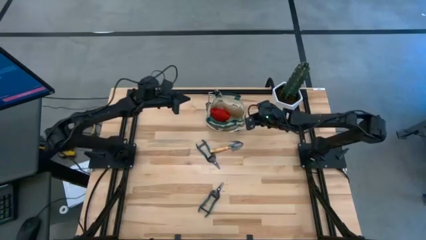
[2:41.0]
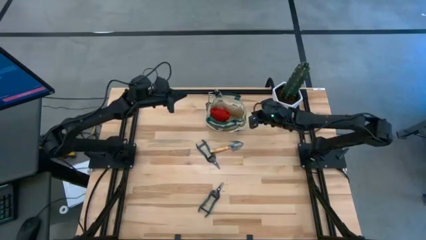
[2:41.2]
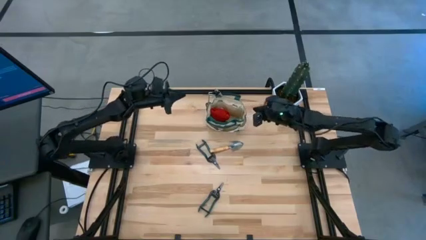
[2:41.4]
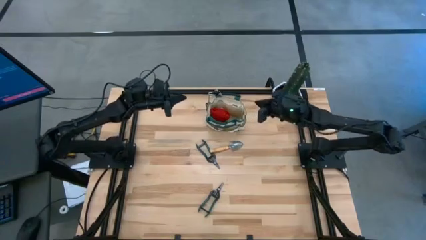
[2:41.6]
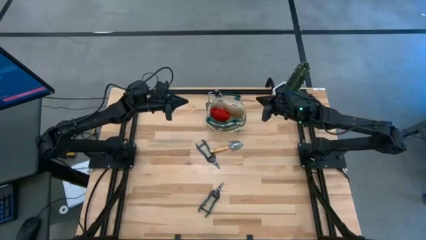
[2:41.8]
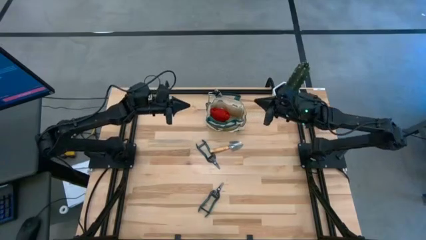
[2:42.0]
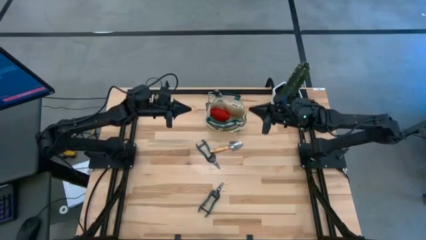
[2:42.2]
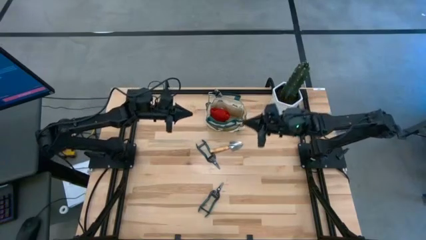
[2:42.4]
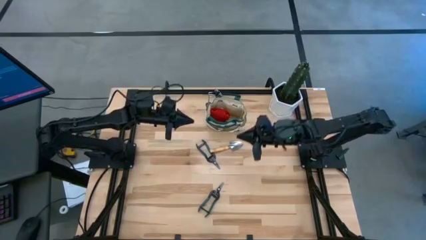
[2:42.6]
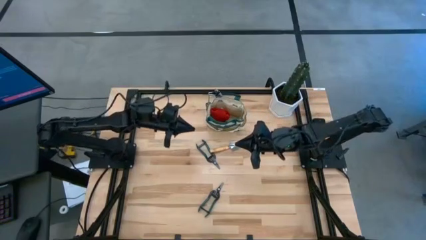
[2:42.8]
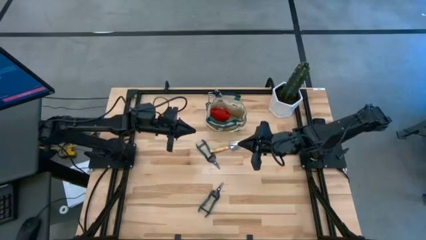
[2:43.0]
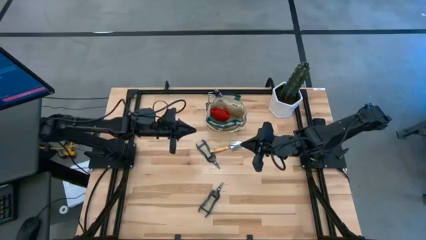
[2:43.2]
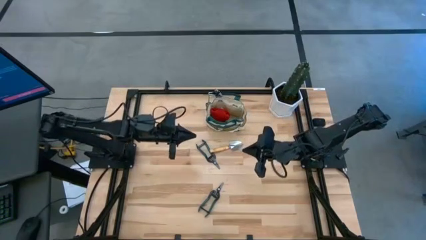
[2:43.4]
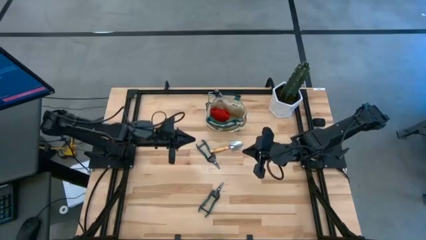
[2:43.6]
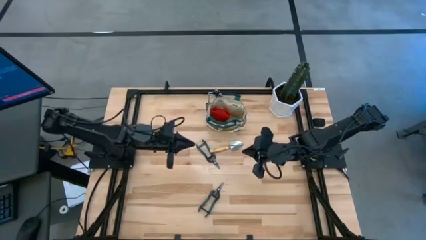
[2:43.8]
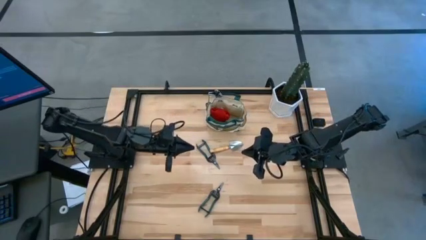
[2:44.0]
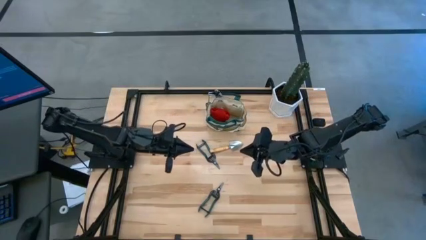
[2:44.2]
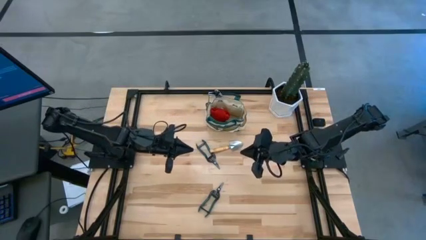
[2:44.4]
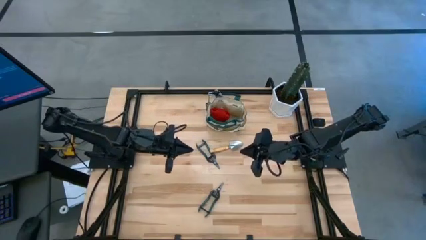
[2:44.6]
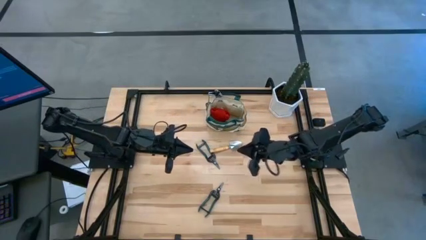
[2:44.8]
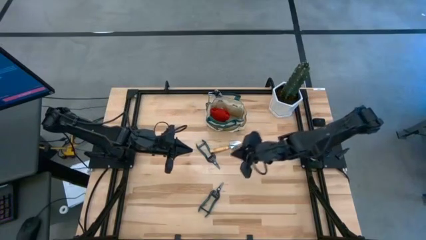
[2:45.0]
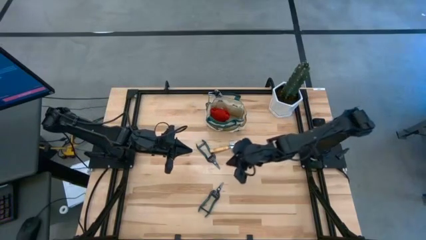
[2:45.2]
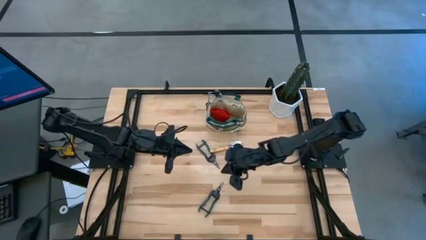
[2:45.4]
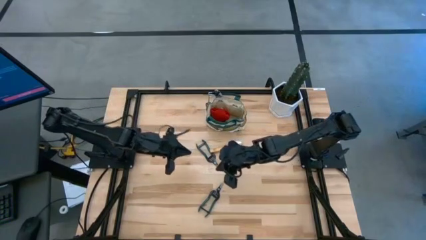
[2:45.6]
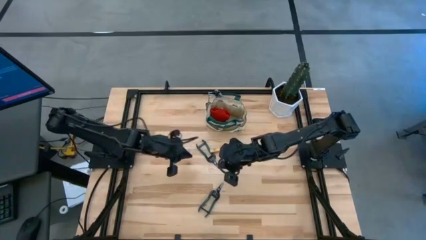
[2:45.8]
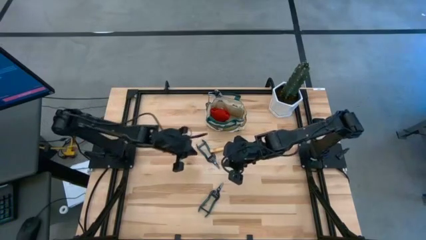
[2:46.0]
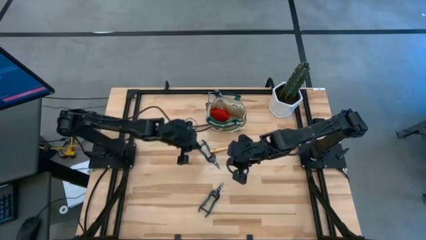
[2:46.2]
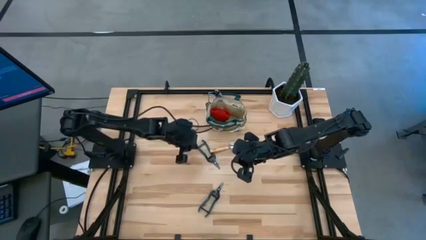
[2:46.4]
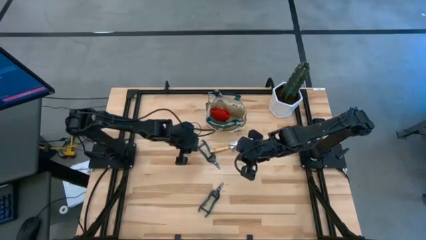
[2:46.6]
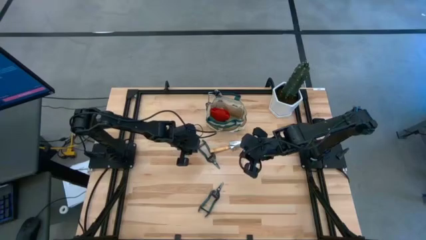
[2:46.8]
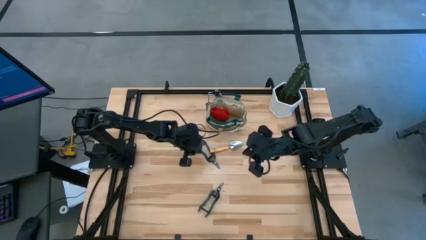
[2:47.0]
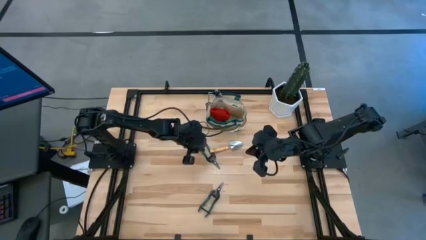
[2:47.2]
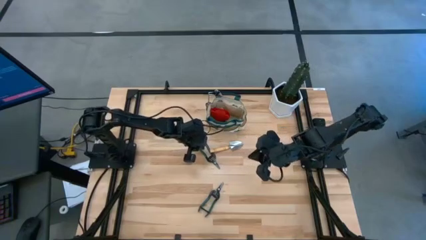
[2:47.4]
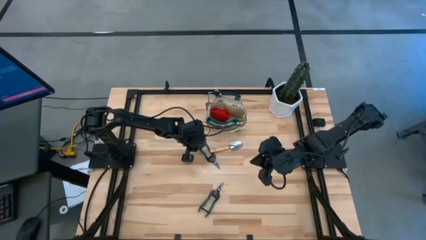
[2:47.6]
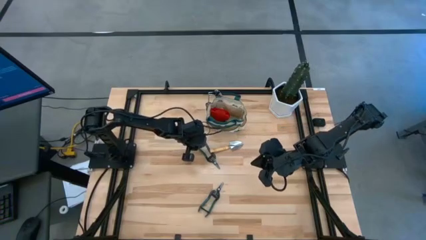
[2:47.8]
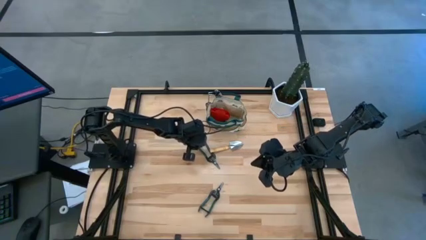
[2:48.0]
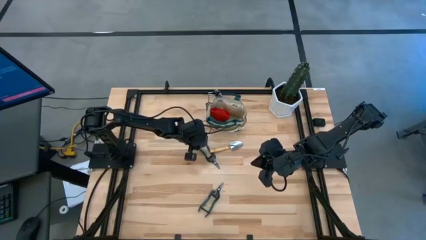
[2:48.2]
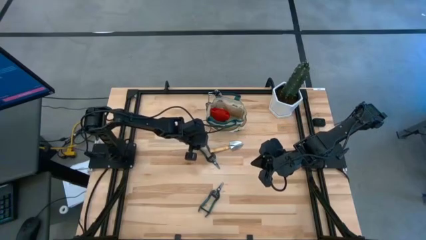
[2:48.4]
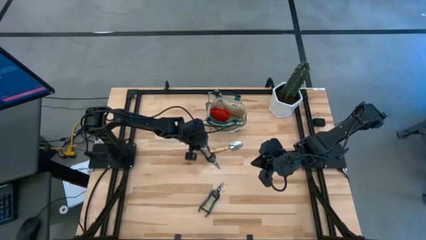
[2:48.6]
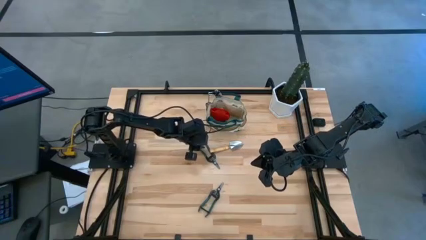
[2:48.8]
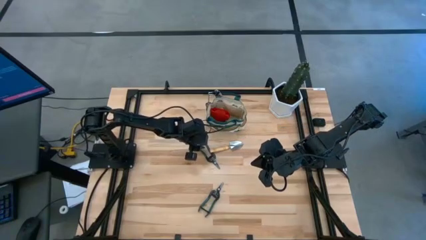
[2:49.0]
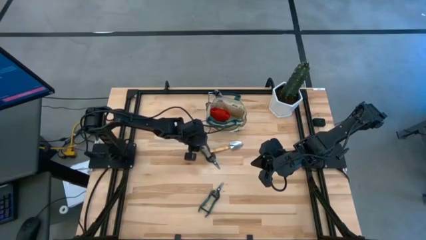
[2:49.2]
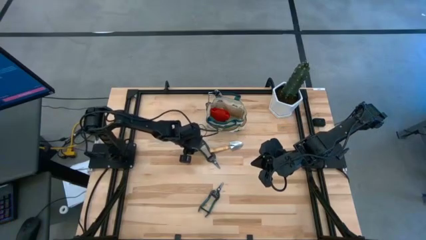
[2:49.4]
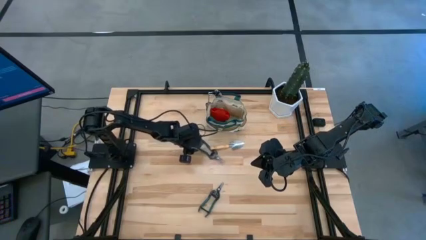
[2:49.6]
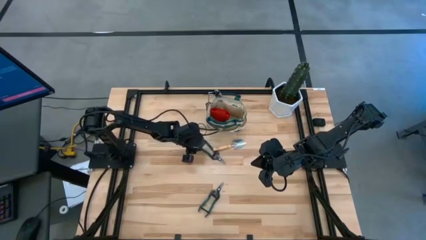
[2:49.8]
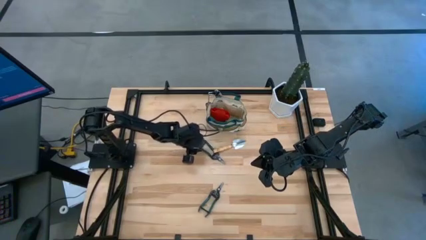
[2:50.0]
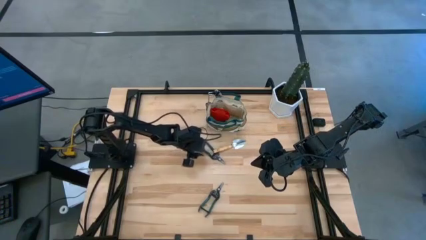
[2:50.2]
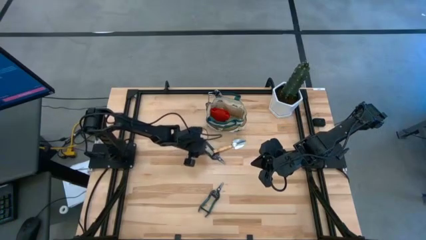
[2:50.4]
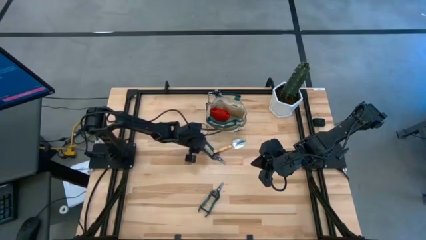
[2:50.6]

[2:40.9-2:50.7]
Task: Pick & Place Garden tools in Gardening bag
Put the top green shears into the brown gardening bag

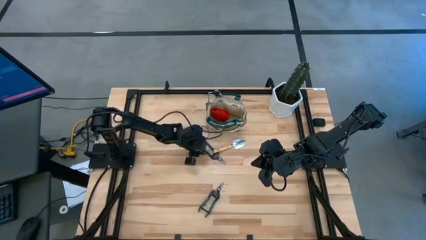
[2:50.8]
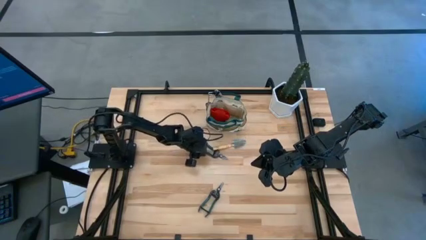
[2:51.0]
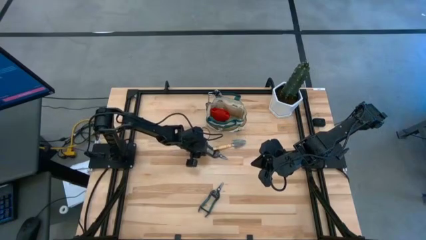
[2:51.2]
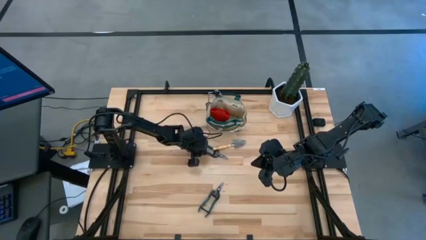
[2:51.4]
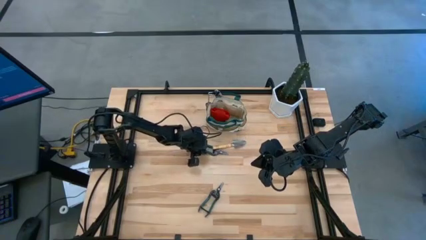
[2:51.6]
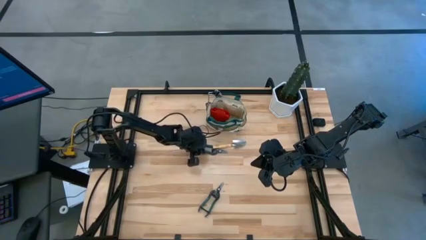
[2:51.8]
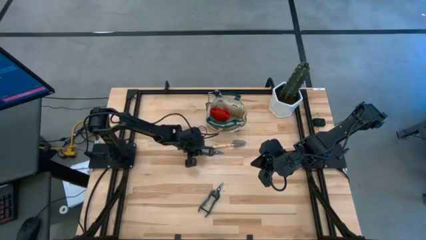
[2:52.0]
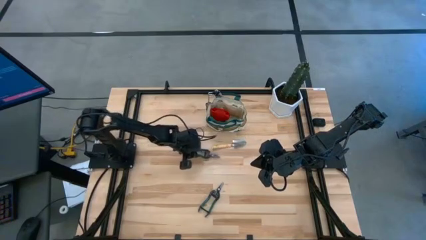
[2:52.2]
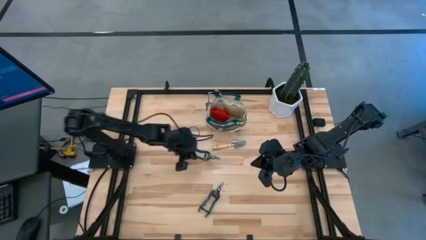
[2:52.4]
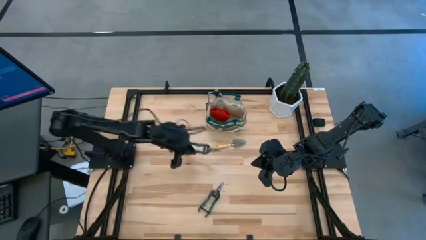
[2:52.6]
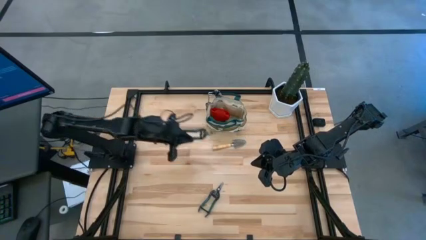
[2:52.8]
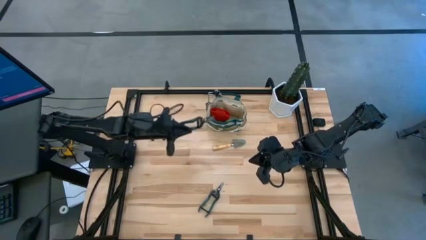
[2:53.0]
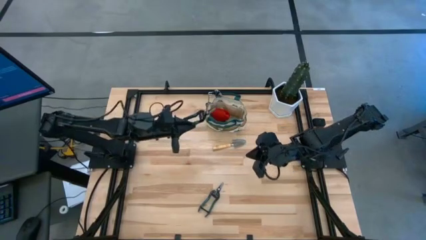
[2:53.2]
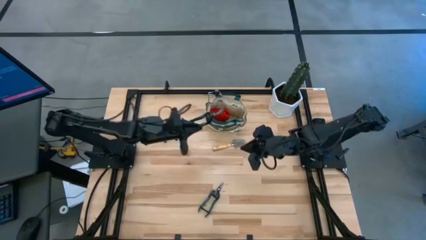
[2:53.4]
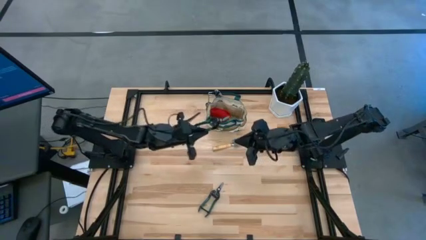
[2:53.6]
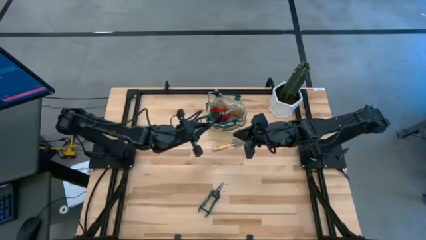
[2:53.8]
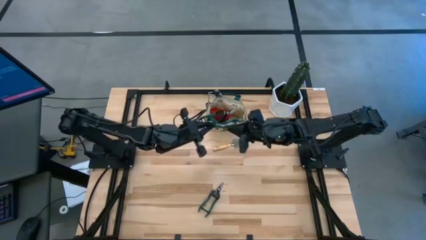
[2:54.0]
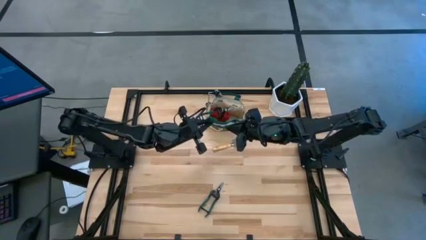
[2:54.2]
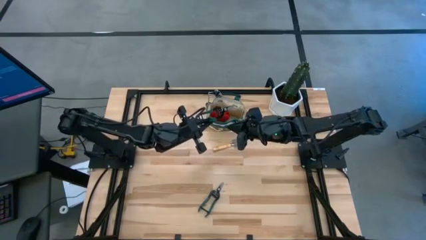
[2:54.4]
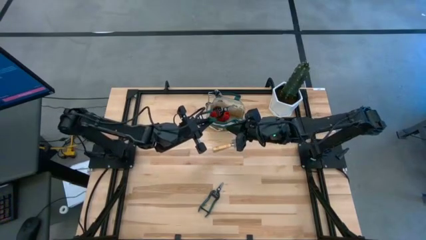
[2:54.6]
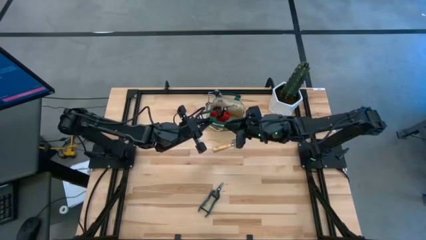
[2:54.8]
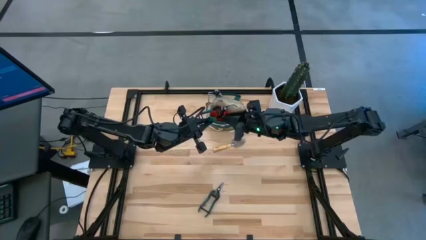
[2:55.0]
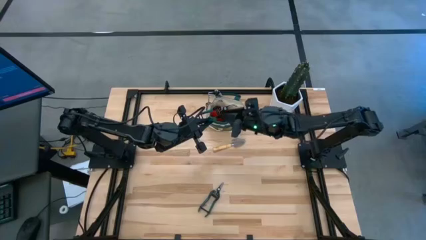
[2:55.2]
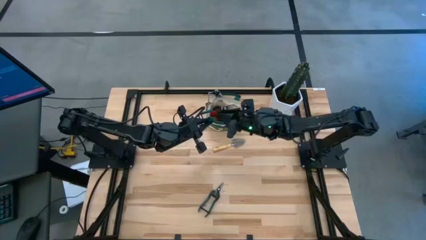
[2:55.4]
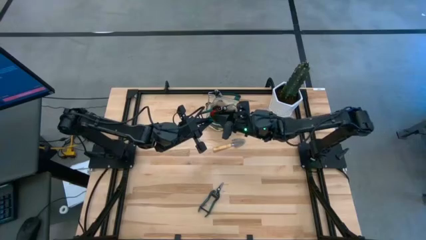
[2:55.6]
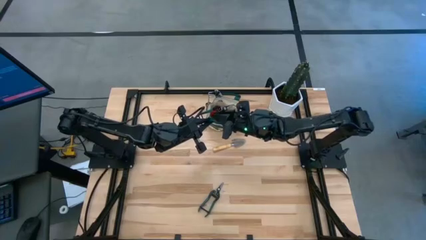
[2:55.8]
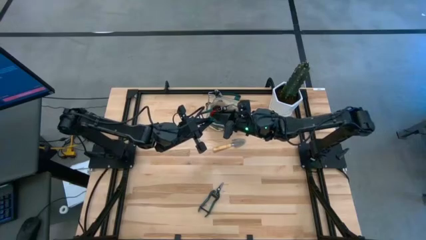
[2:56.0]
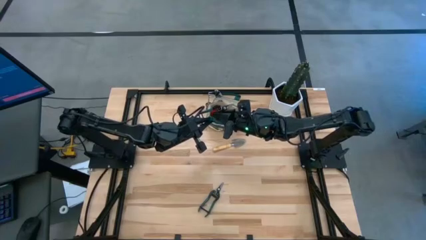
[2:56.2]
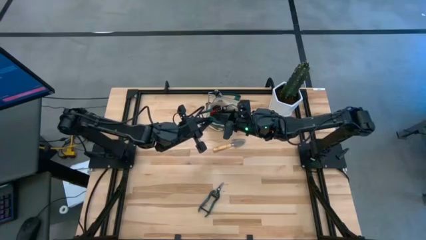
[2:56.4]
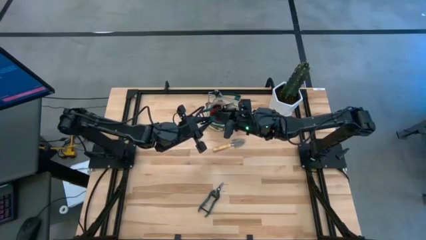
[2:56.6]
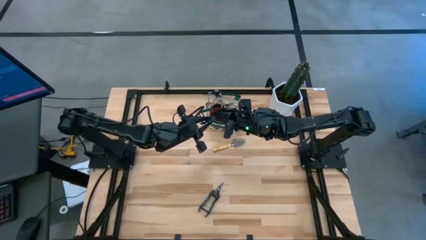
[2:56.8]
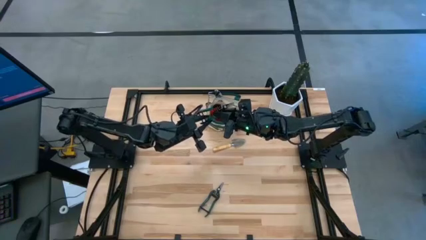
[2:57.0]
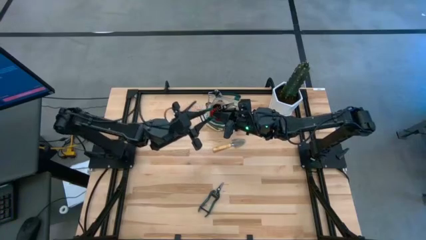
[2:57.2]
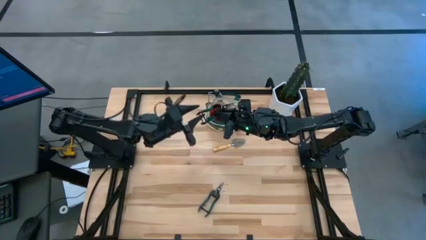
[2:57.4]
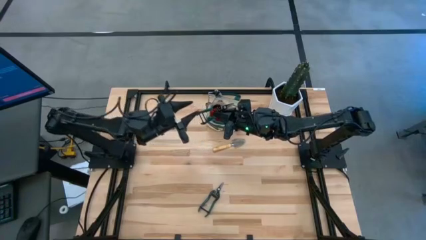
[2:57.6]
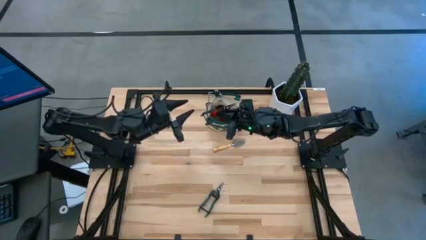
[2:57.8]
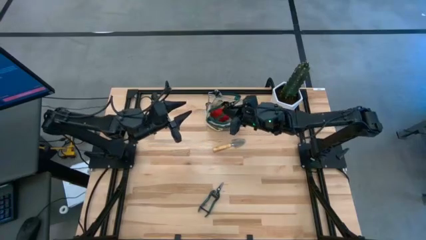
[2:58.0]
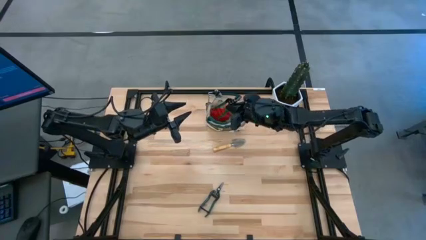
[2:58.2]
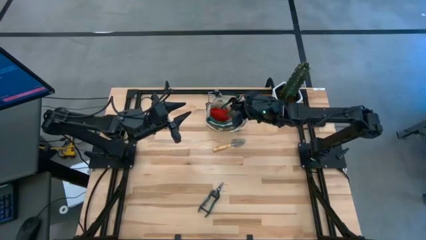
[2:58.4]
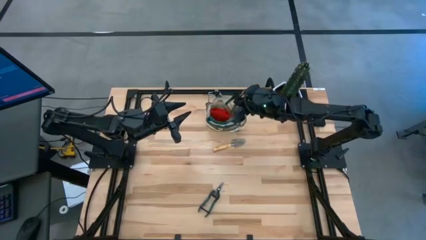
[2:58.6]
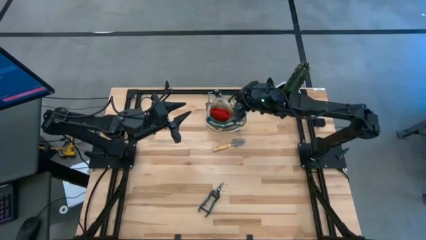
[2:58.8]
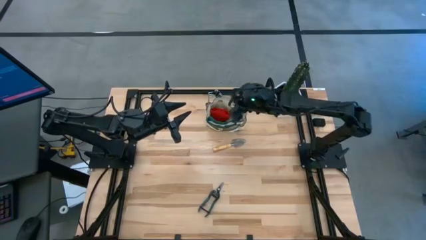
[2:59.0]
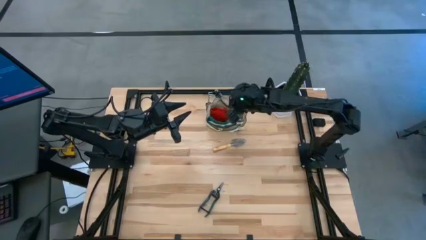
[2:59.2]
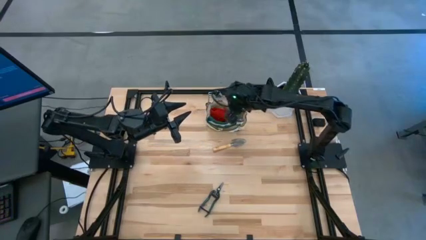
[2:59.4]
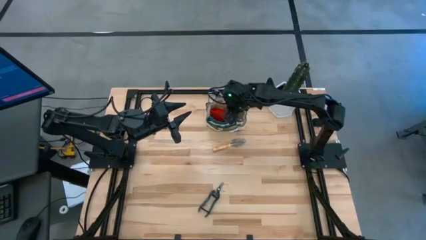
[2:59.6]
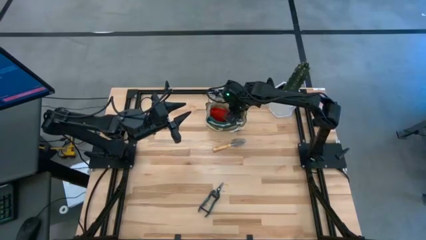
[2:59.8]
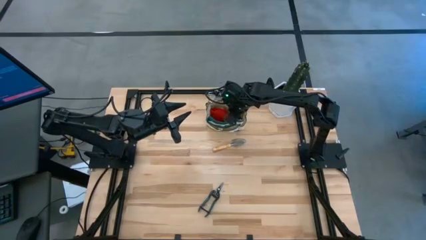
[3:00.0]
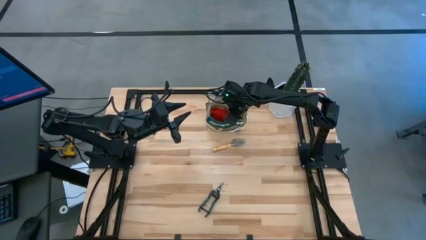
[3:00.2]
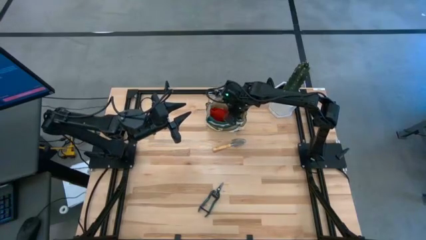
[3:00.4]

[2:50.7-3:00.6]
Put the top green shears into the brown gardening bag
